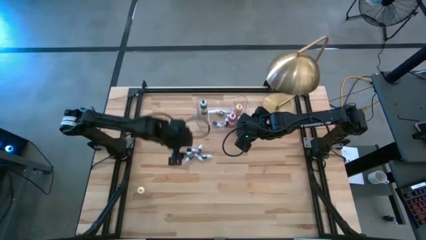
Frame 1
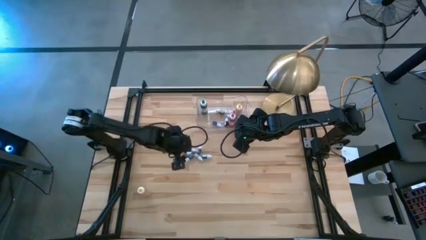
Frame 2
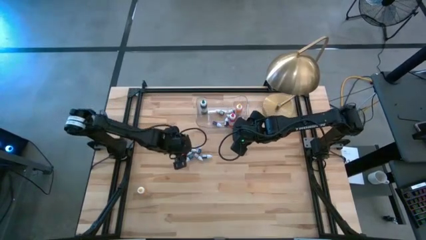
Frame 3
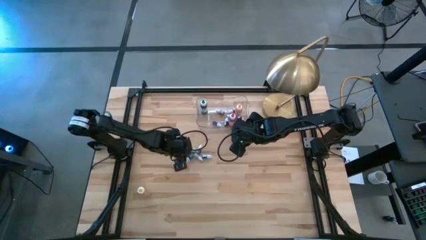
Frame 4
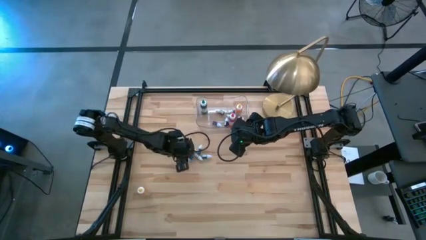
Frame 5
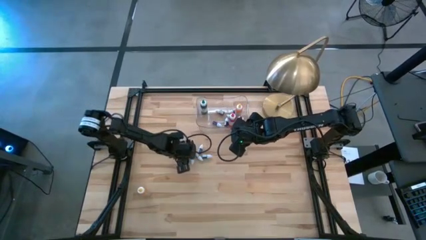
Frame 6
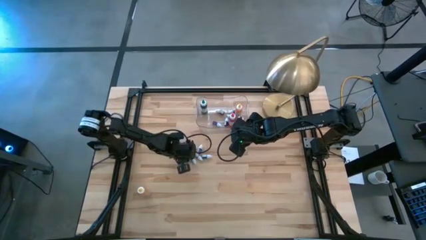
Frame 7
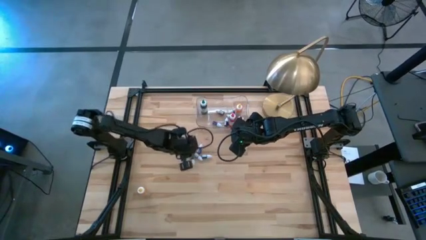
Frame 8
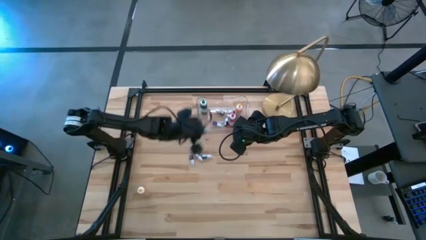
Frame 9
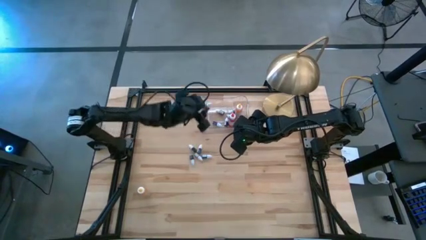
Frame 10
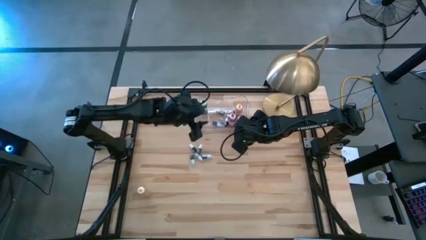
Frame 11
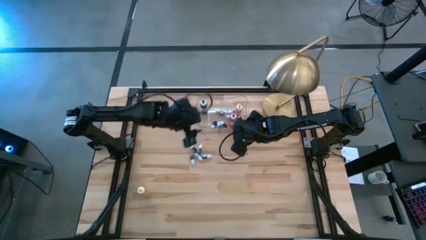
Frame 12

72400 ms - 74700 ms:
Task: Pick & Place food coloring
Put the small red food coloring bottle into the transparent bin

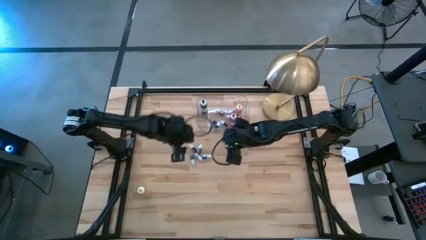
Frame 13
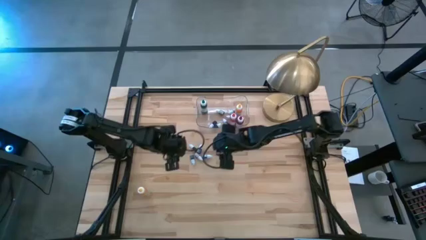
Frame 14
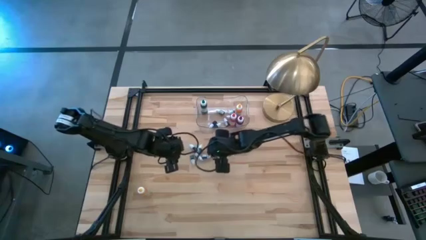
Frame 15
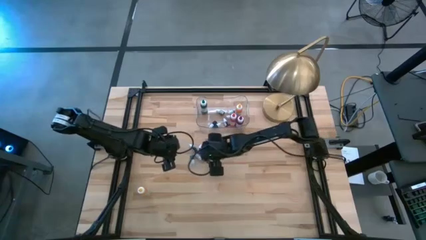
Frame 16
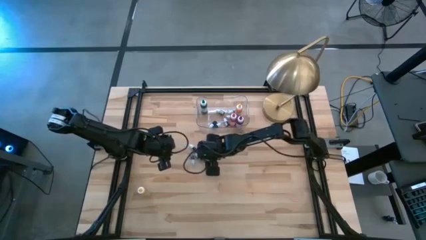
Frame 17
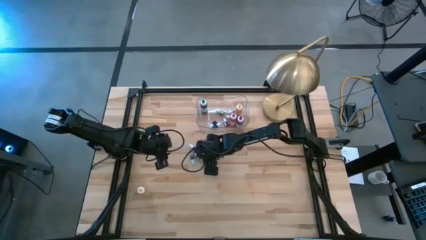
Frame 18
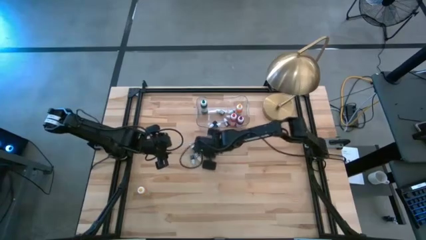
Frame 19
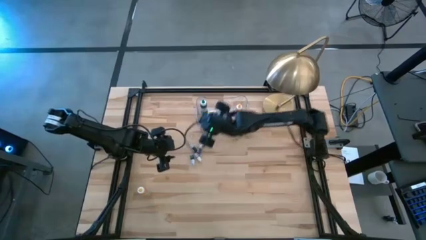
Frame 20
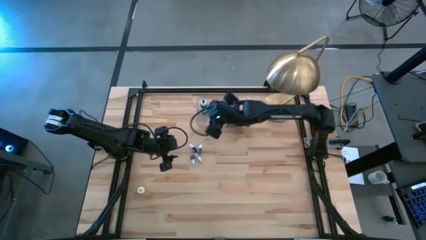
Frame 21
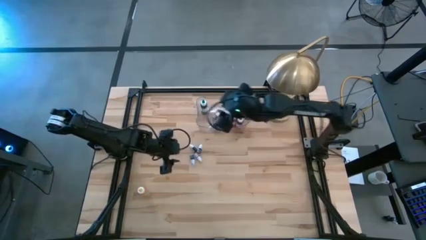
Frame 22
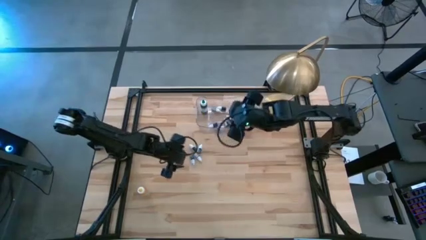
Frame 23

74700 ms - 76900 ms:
Put the small black food coloring bottle into the transparent bin

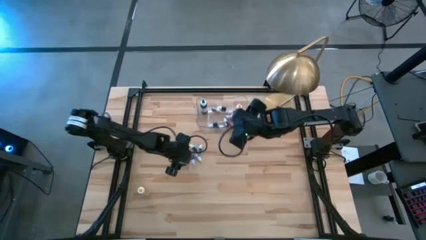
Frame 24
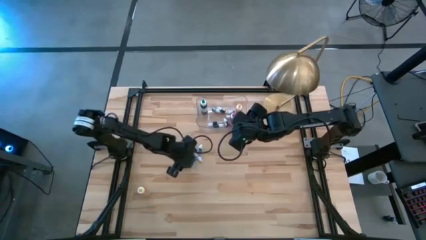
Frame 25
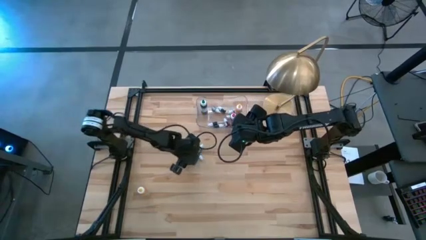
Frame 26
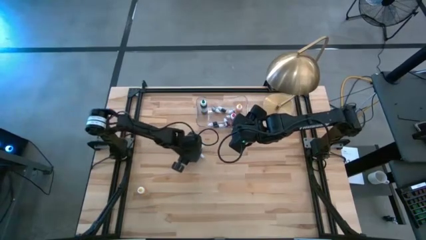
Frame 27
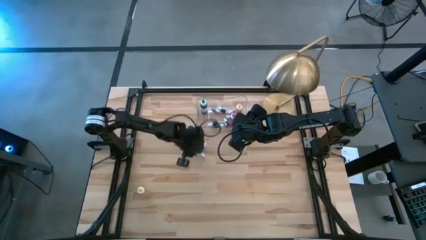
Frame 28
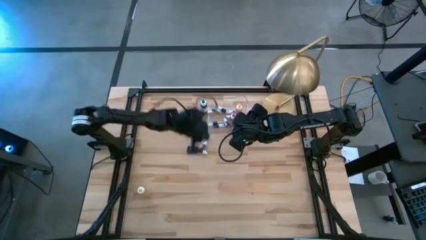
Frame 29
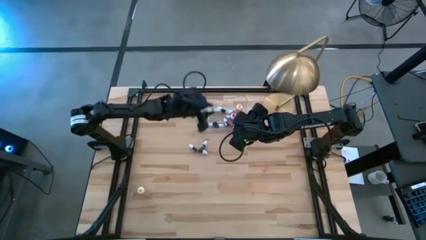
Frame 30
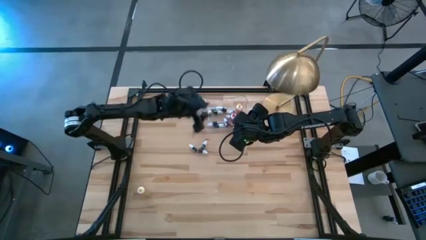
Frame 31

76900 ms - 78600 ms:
Put the small green food coloring bottle into the transparent bin

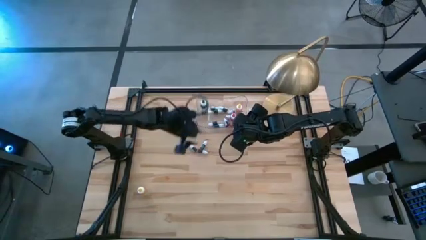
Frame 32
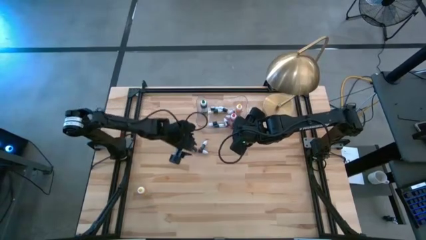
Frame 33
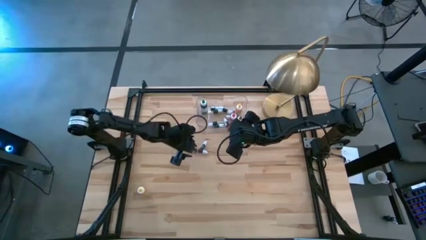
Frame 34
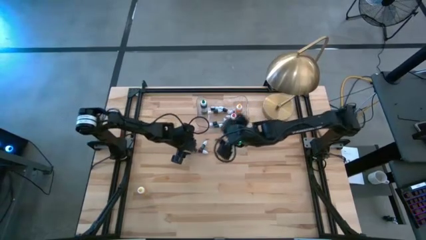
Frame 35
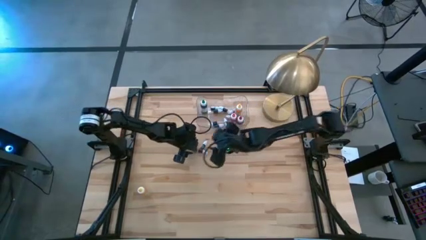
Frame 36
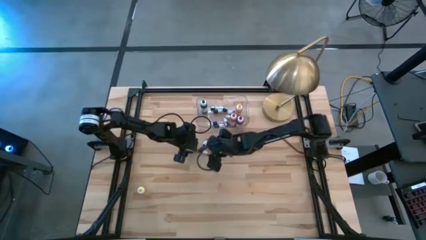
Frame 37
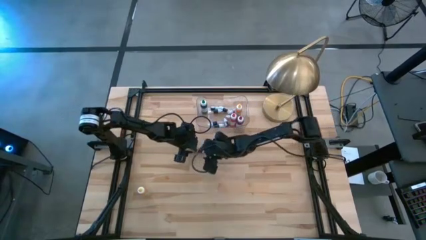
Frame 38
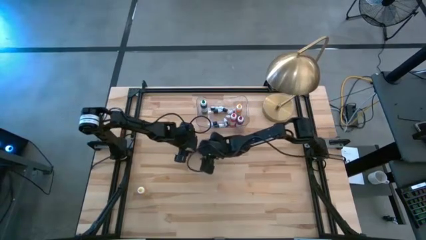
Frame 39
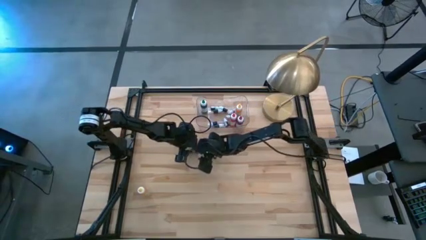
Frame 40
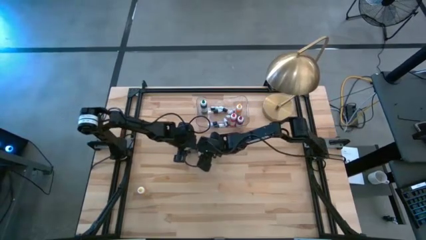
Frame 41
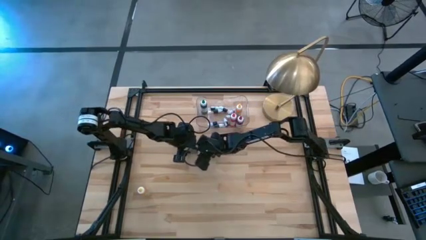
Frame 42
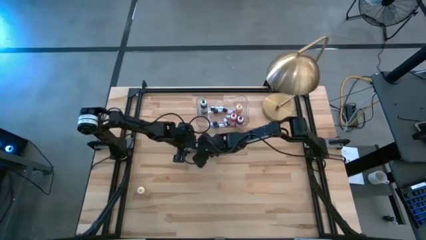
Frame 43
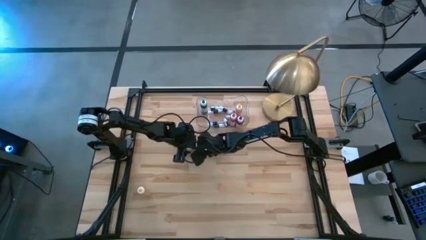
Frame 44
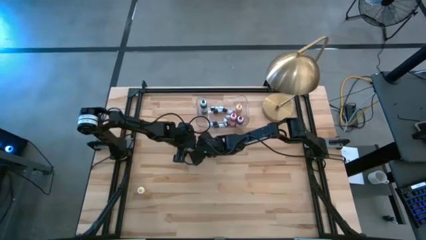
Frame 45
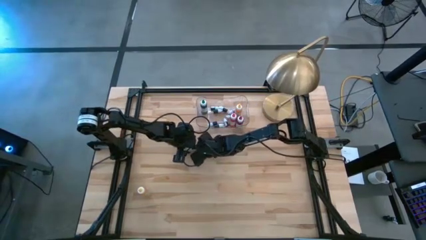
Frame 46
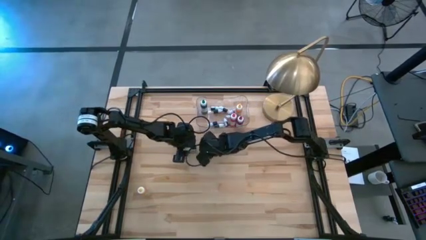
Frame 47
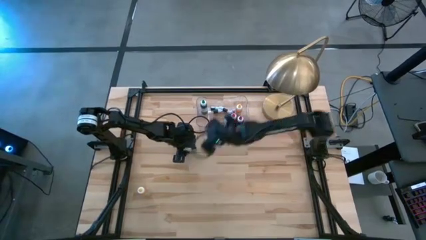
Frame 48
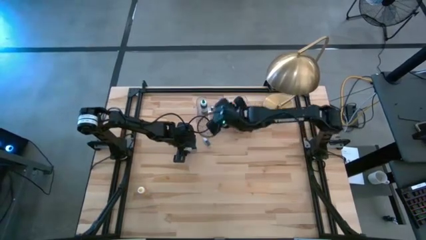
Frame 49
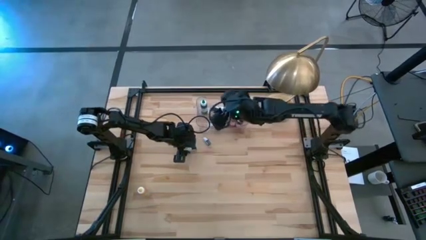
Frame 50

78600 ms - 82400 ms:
Put the small red food coloring bottle into the transparent bin

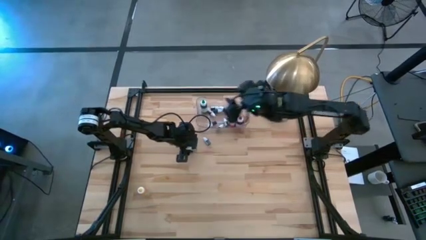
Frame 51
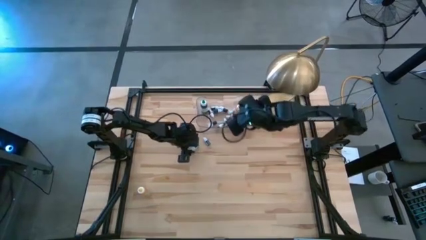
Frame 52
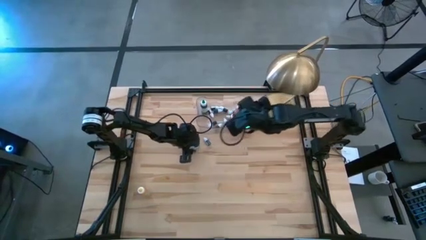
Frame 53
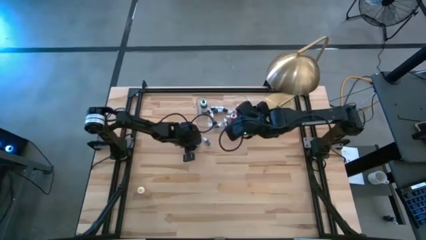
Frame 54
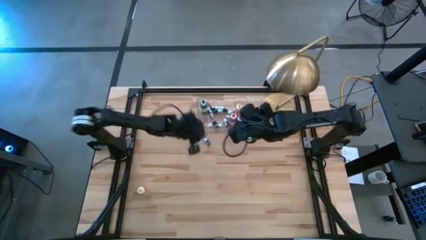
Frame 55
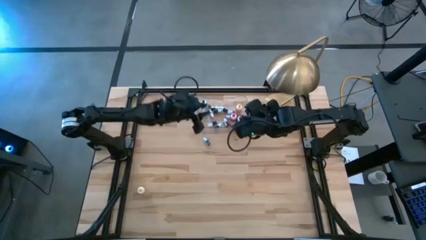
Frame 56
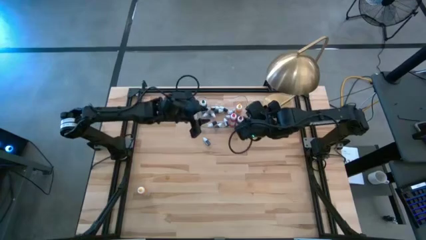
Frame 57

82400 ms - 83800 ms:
Put the small black food coloring bottle into the transparent bin

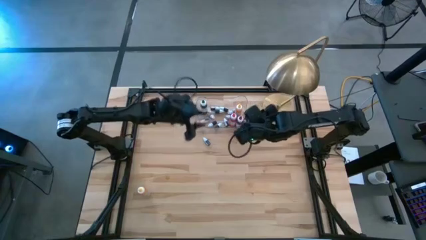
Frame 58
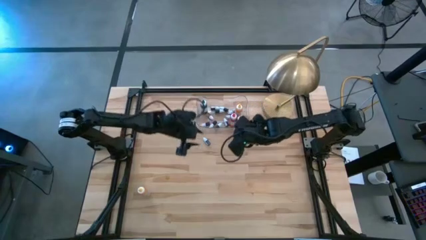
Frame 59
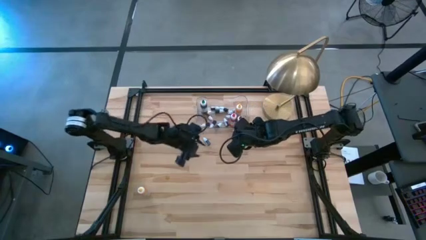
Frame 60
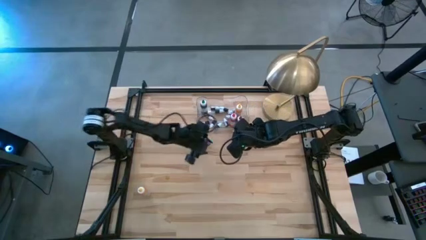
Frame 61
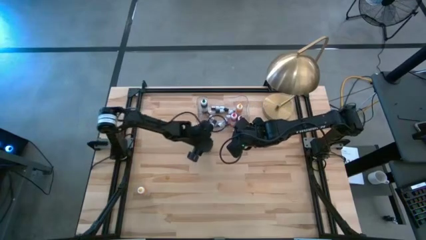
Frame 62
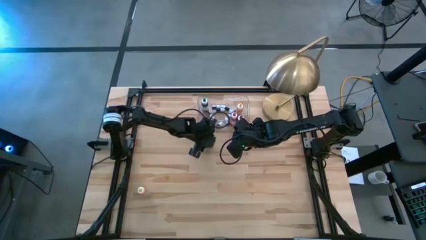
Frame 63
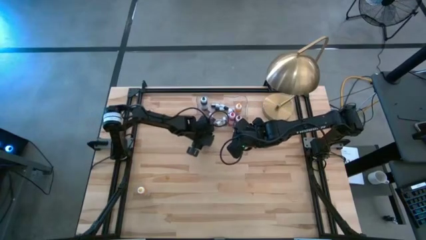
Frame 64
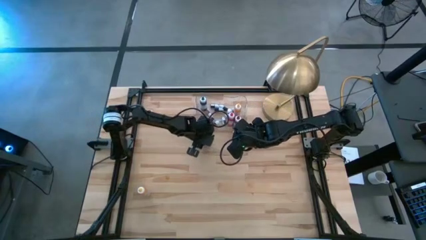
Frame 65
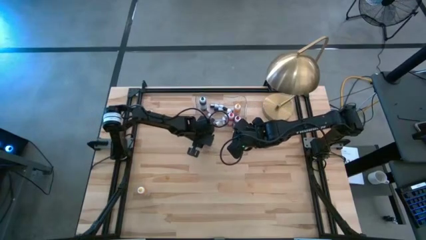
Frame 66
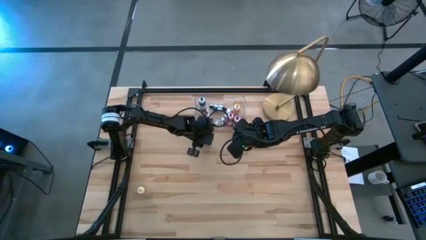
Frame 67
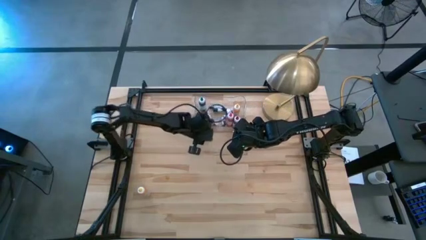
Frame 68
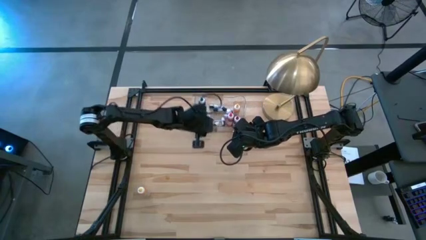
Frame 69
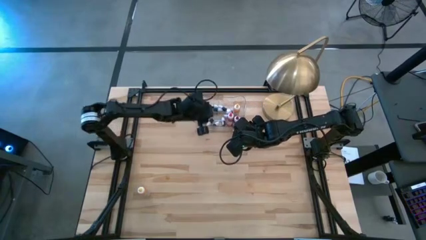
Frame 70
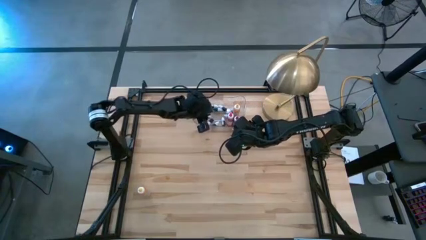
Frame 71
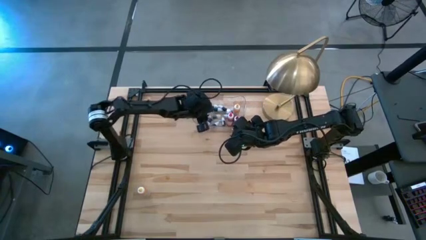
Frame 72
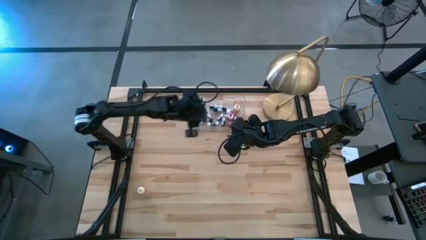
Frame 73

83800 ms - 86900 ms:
Put the small black food coloring bottle into the transparent bin

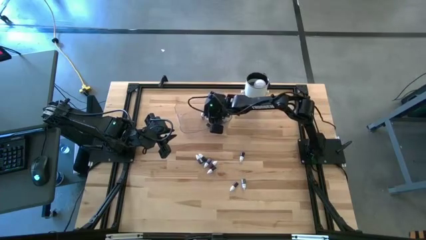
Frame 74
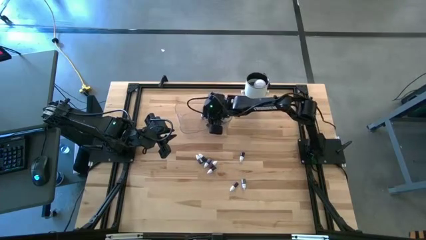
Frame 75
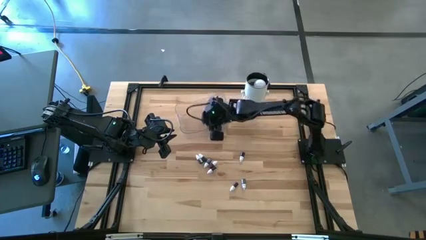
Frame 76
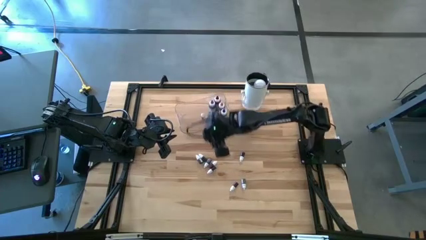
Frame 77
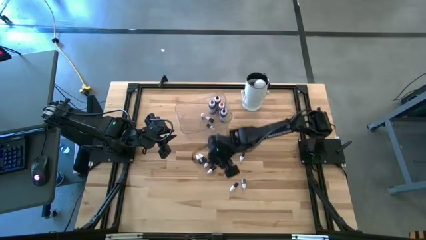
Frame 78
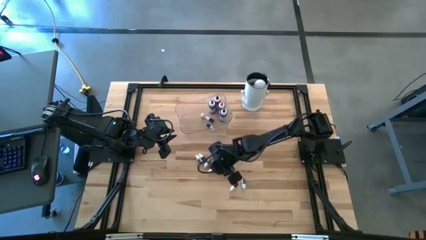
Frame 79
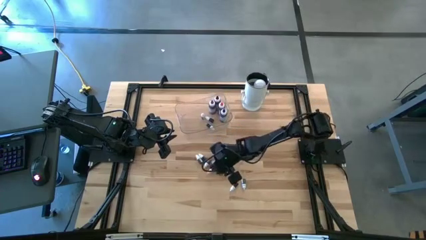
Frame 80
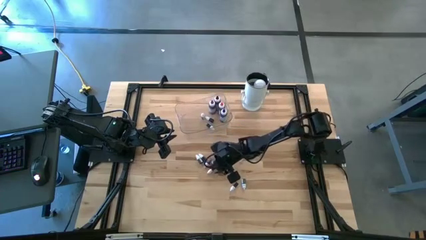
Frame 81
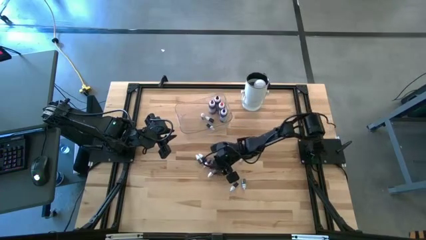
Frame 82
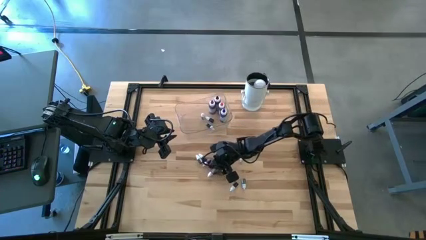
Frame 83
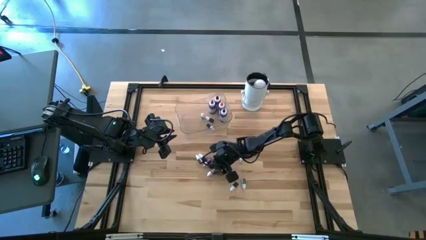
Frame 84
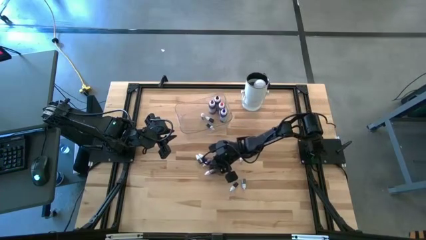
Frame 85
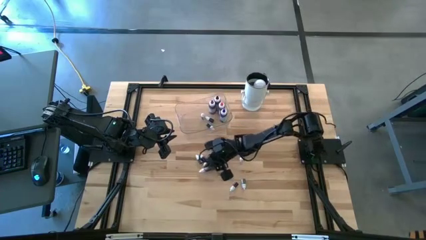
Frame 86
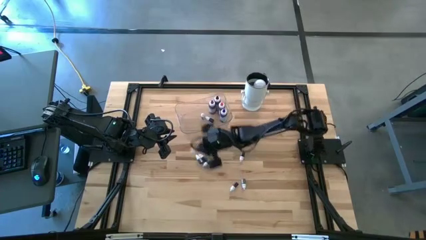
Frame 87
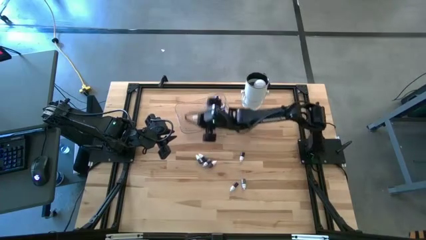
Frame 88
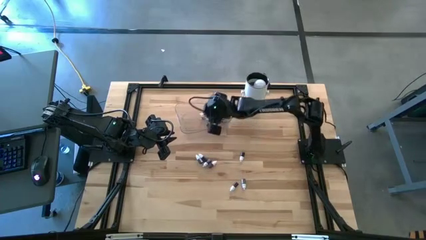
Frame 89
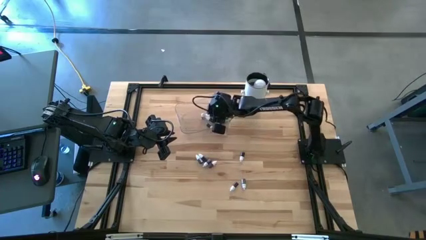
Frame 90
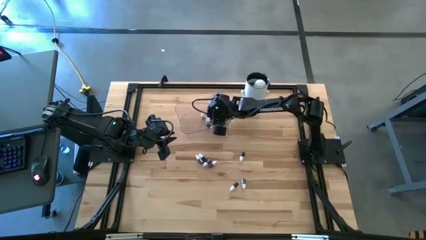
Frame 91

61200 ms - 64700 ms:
Task: Pick & Place food coloring
Put the small green food coloring bottle into the transparent container
